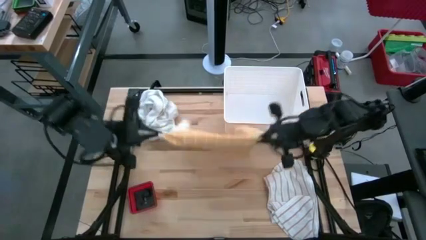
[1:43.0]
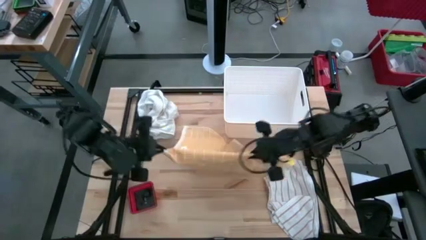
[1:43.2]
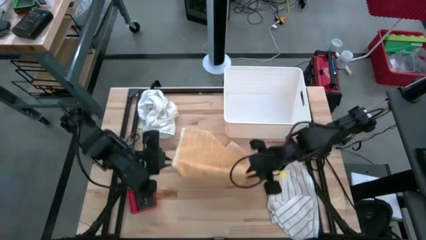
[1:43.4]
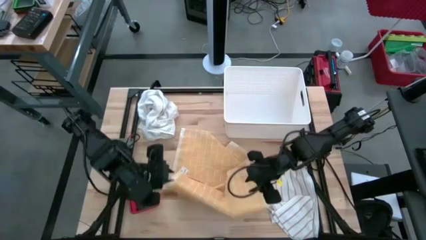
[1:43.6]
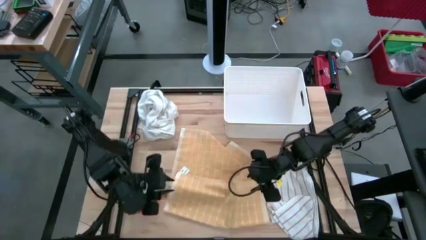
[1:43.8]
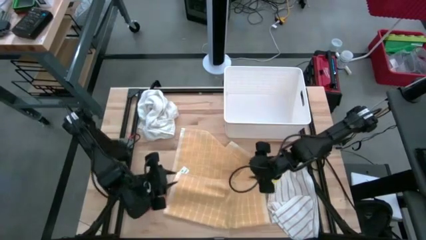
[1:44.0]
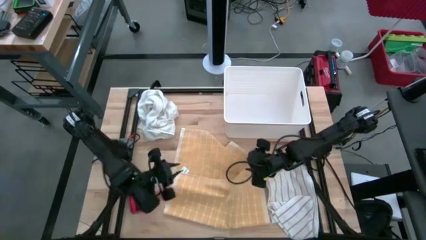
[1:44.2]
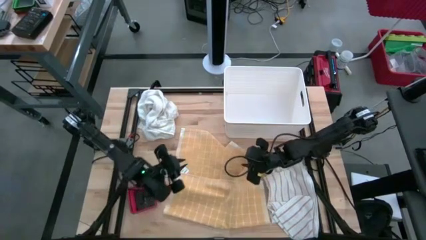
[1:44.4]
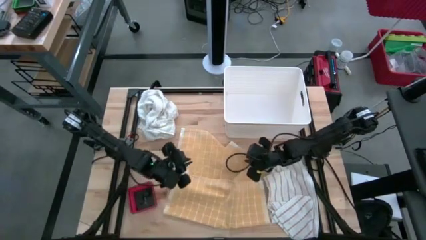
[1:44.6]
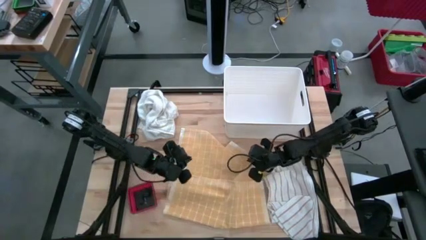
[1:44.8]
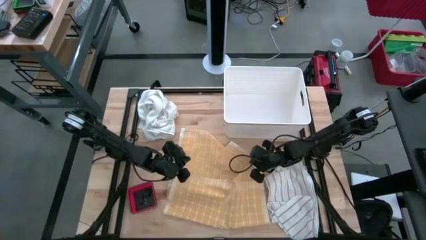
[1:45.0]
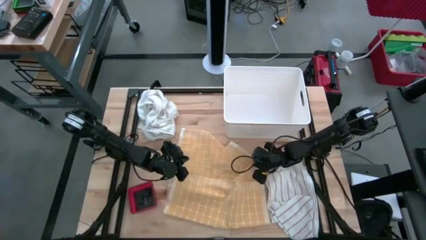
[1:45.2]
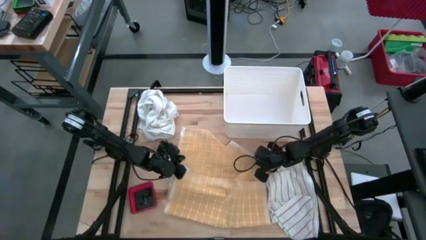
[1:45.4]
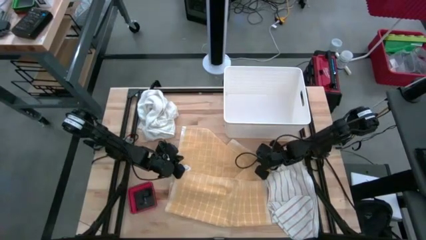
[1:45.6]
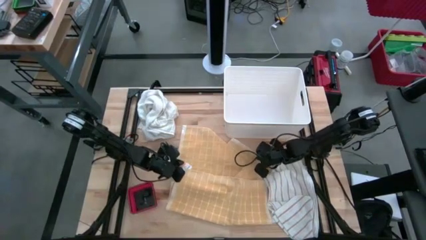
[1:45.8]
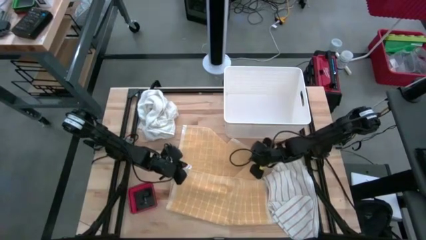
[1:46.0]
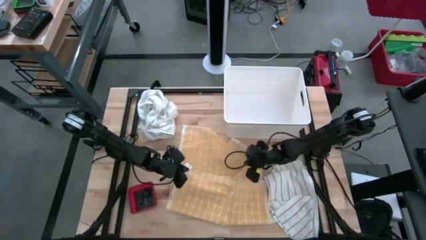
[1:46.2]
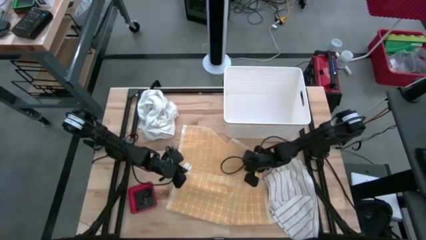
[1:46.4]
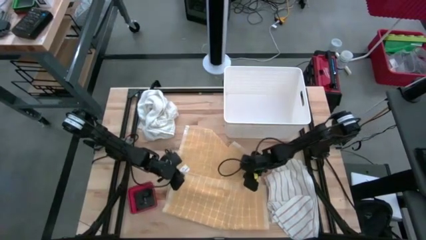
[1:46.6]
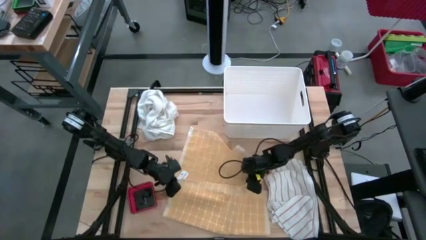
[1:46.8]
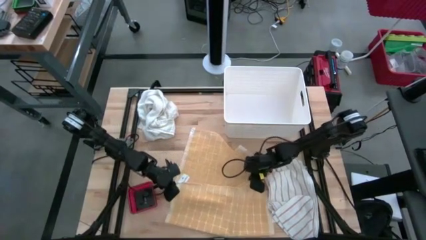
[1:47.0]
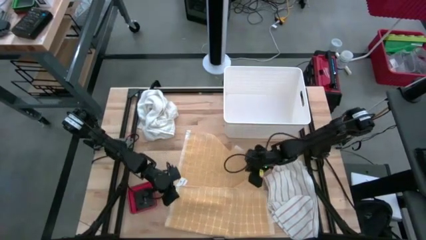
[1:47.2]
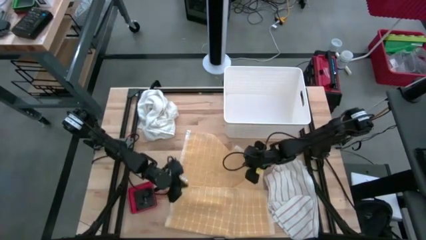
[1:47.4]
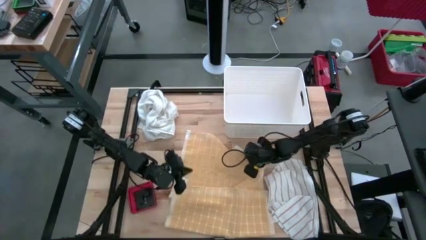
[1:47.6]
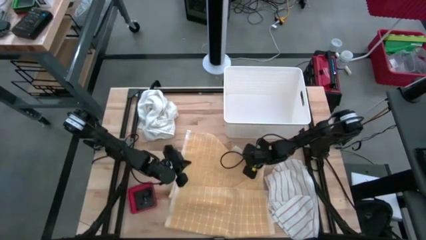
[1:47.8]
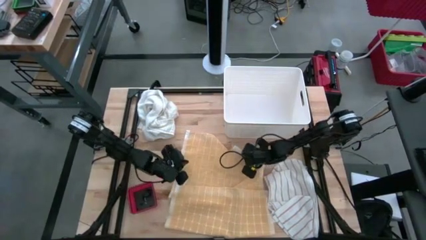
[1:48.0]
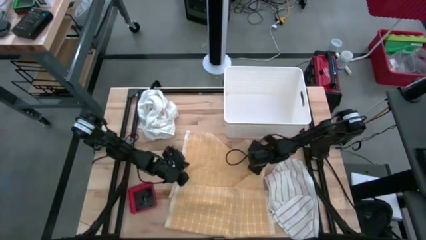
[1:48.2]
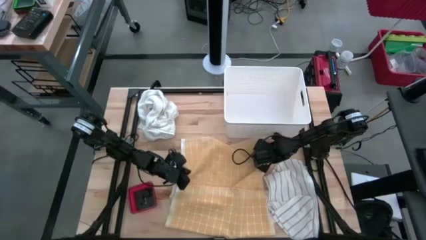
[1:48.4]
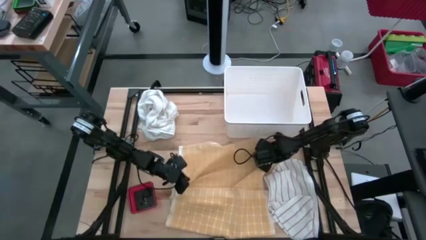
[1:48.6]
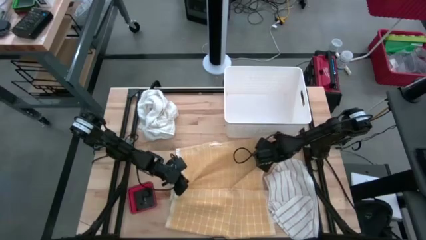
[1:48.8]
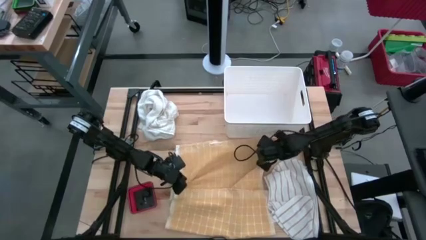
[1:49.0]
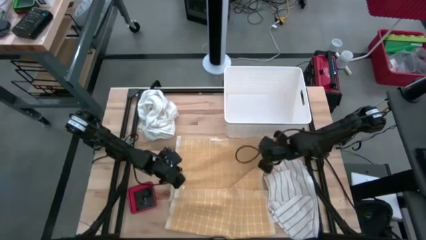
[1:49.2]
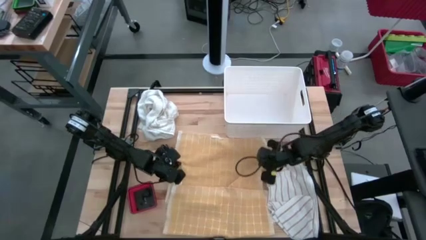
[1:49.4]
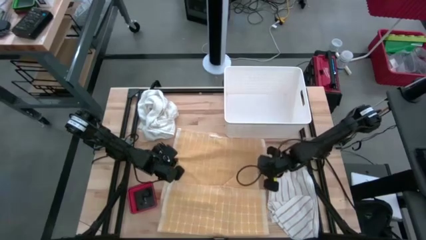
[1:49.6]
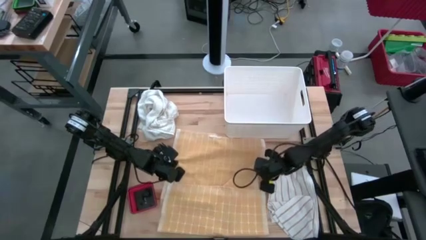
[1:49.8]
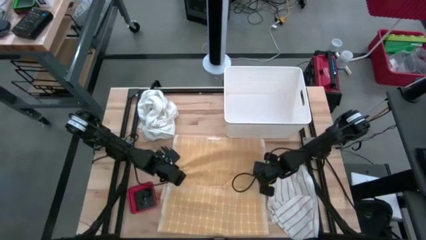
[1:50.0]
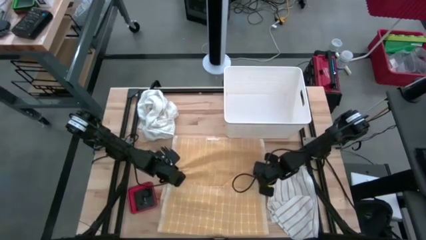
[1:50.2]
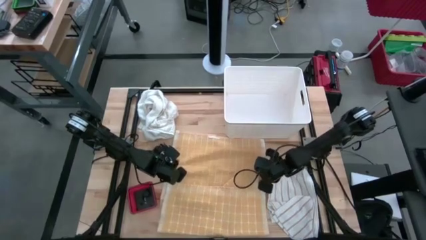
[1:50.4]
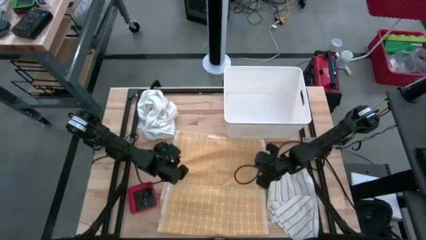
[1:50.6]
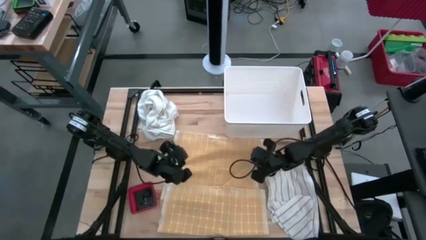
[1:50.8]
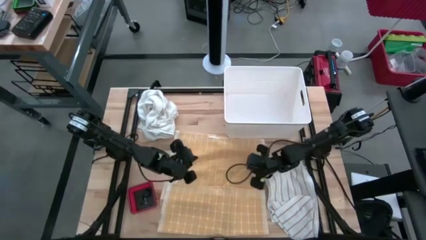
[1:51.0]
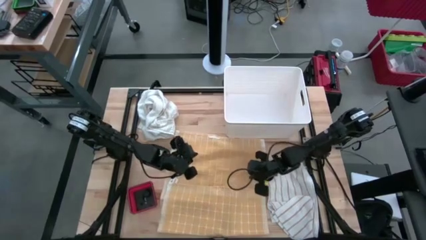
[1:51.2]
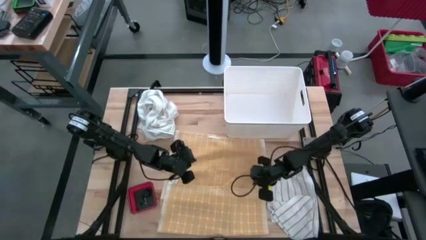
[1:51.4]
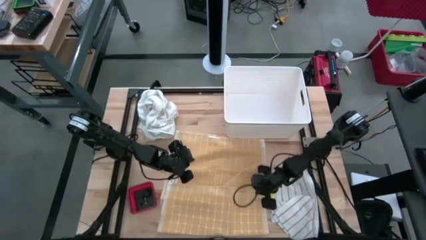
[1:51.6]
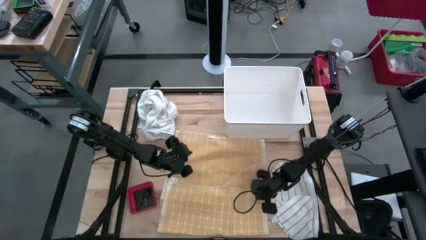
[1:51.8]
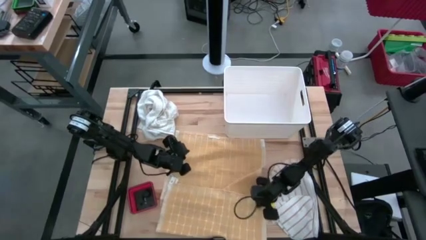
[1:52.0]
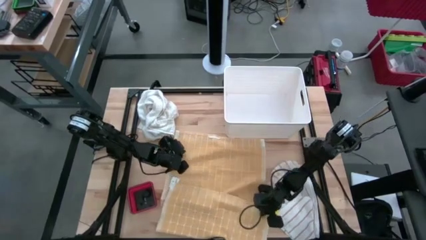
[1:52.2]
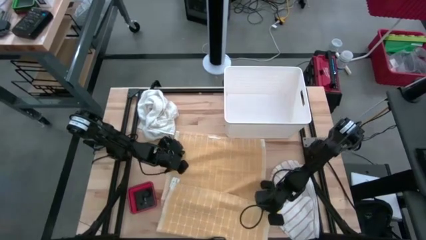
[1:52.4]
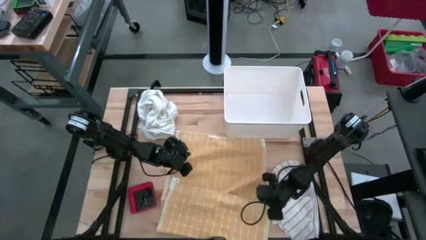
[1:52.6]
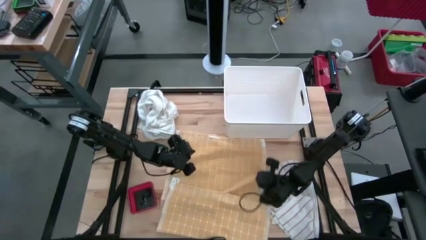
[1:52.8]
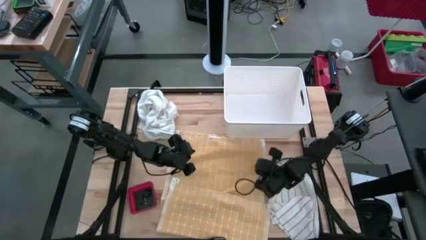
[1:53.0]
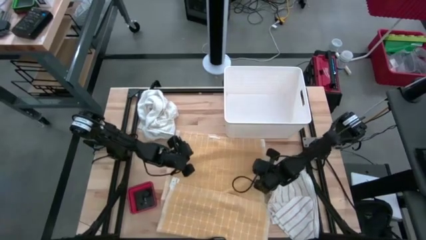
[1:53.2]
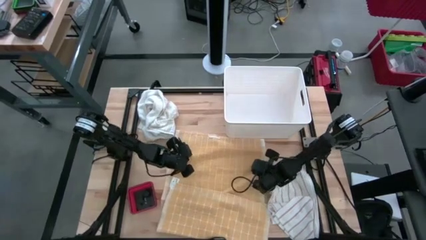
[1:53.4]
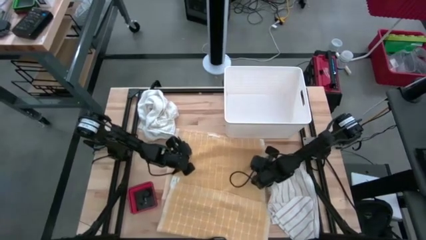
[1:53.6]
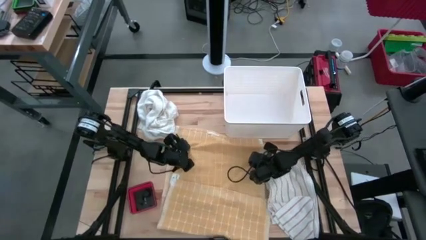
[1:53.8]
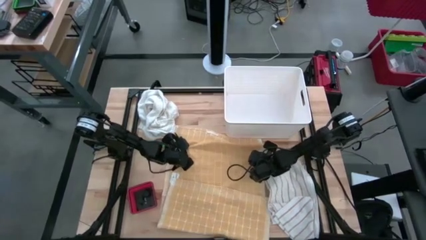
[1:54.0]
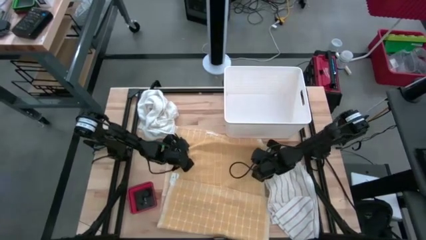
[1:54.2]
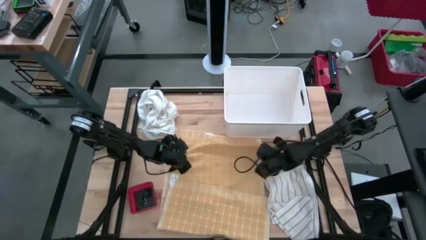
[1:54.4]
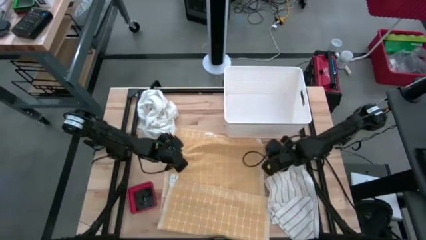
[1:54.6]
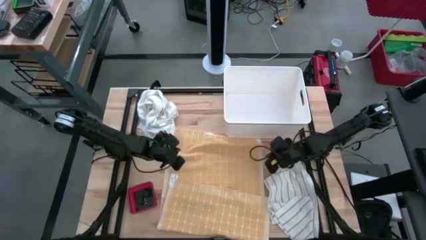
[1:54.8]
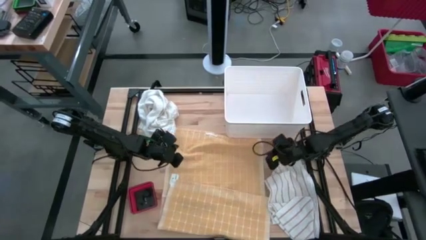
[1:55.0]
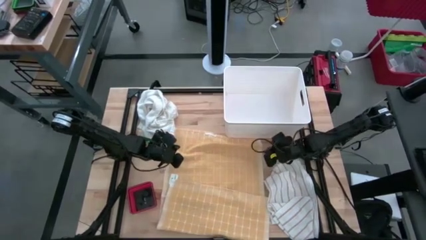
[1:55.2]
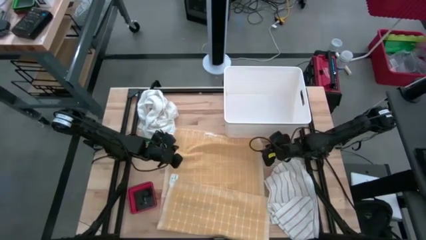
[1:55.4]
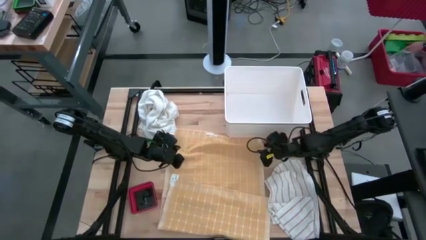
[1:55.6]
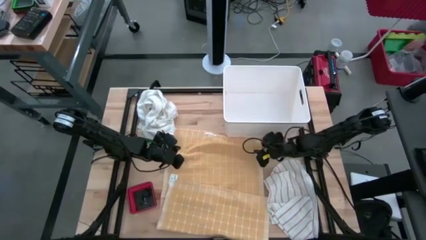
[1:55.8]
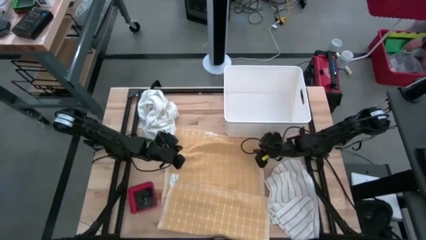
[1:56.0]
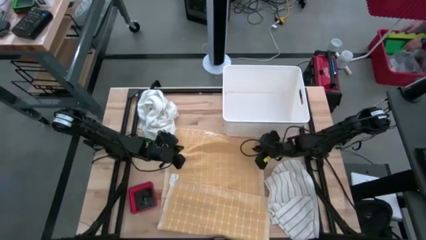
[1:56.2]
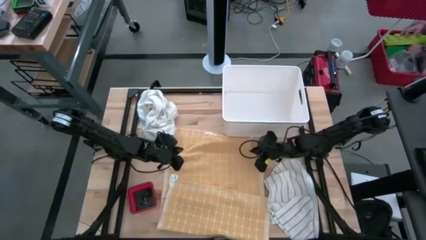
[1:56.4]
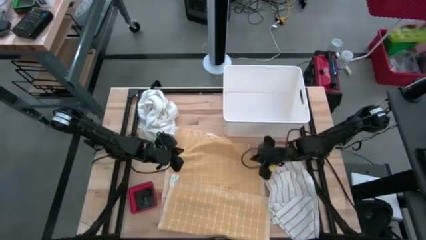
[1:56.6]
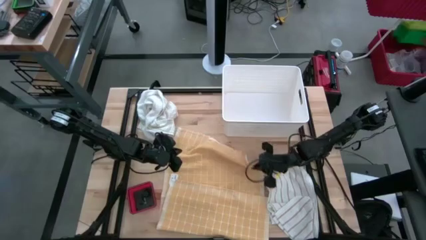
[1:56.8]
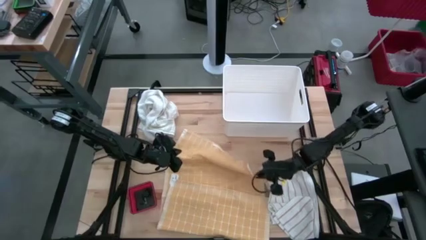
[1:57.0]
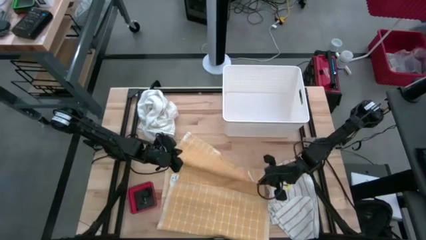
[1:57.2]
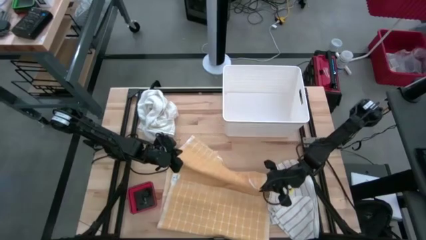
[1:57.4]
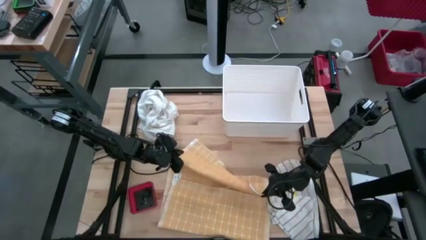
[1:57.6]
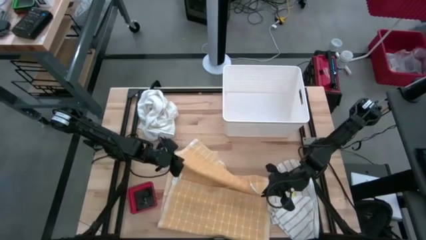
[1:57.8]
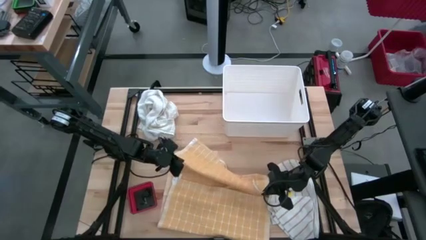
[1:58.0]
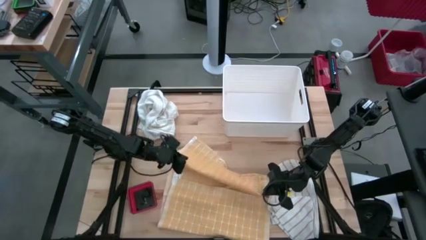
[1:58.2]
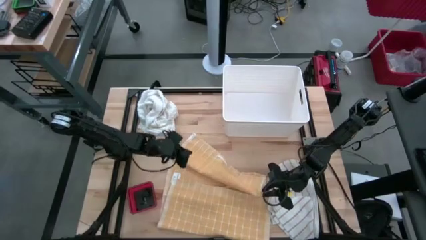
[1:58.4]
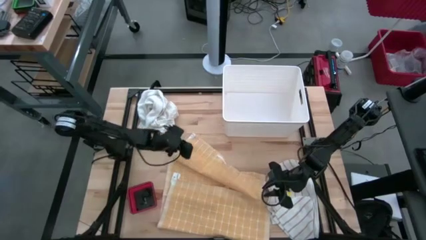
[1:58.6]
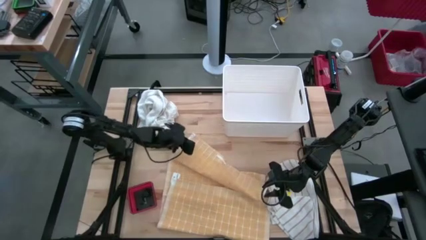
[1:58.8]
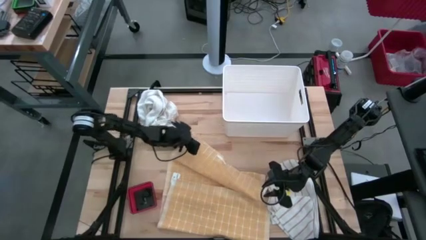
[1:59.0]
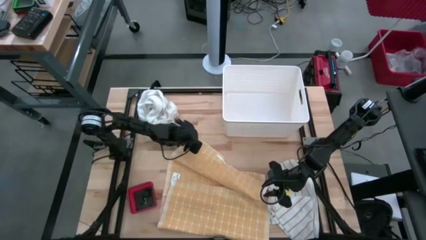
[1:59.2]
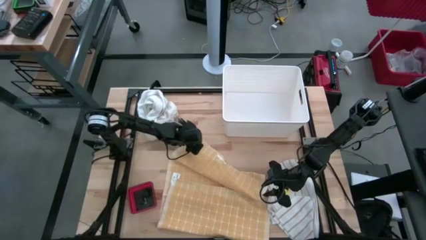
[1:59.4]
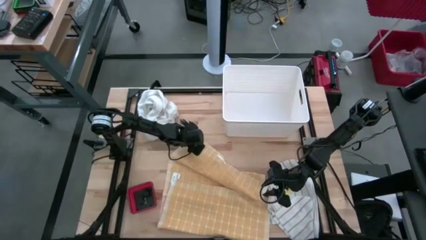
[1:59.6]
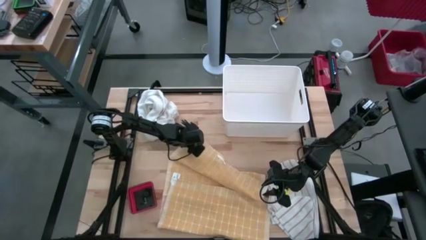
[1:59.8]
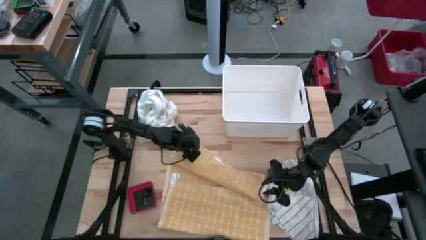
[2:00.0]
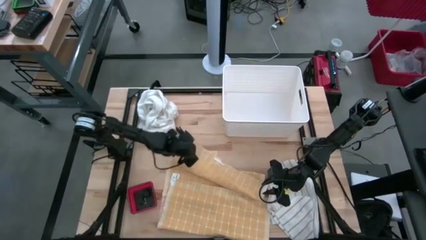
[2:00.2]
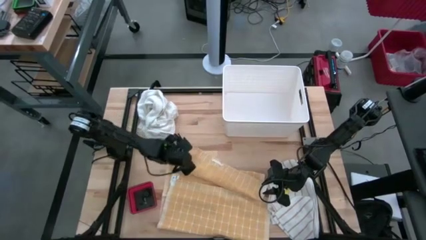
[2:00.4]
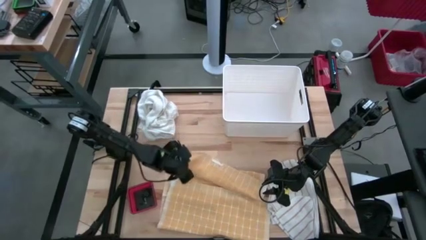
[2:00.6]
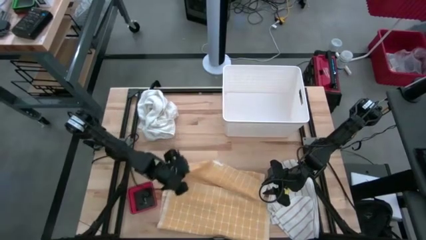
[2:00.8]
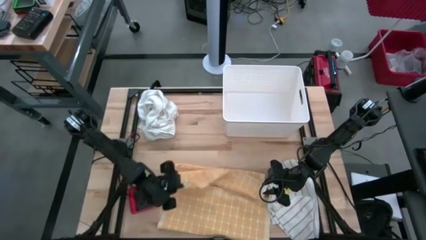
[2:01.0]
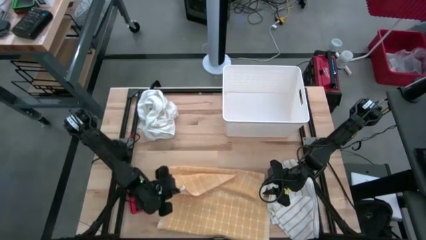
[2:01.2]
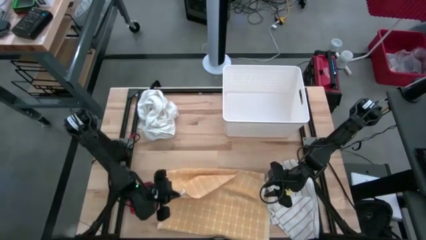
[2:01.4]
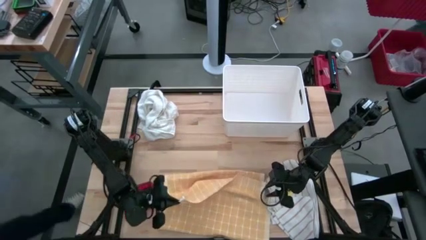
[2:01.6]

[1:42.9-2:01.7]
Task: Fold towel
Fold the yellow kitchen towel
